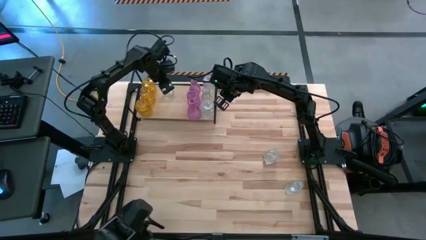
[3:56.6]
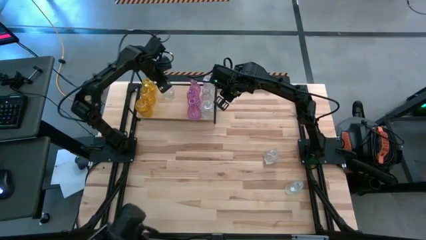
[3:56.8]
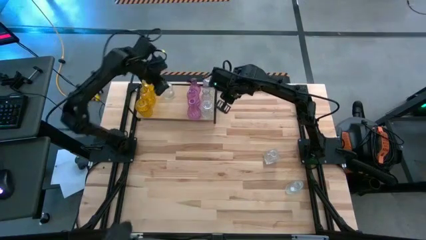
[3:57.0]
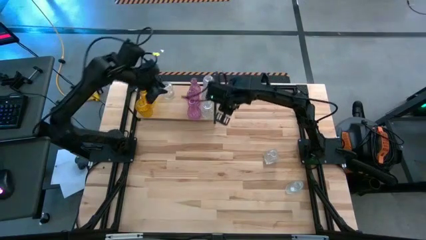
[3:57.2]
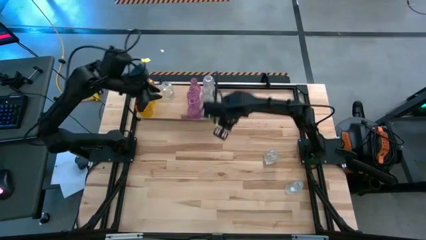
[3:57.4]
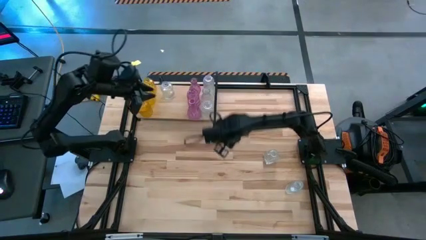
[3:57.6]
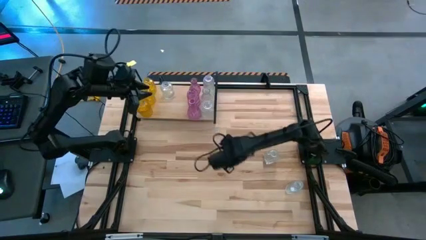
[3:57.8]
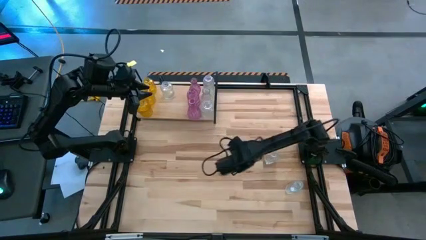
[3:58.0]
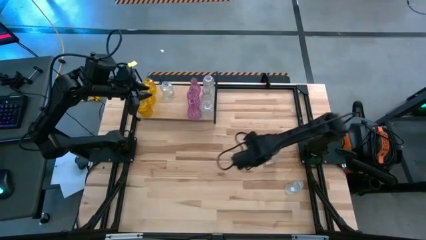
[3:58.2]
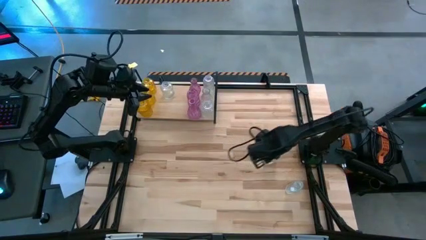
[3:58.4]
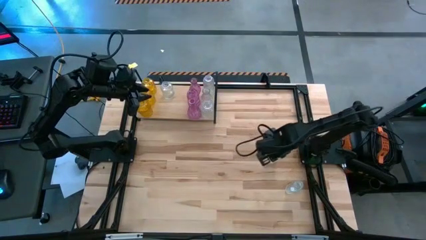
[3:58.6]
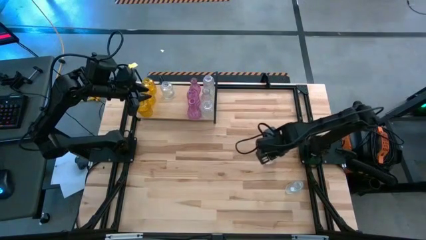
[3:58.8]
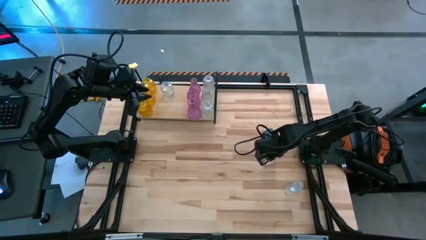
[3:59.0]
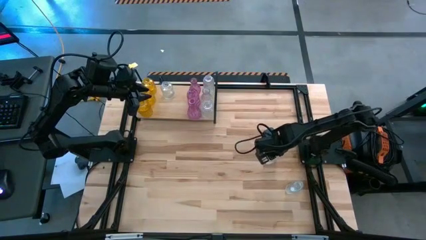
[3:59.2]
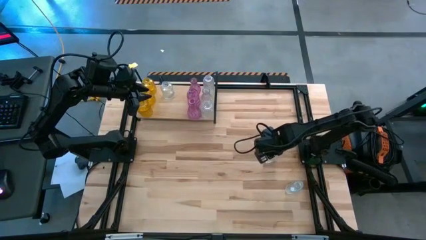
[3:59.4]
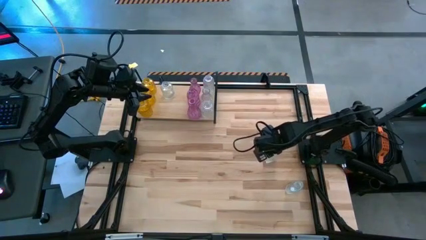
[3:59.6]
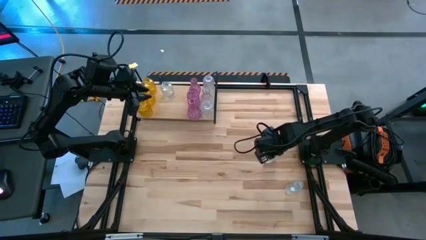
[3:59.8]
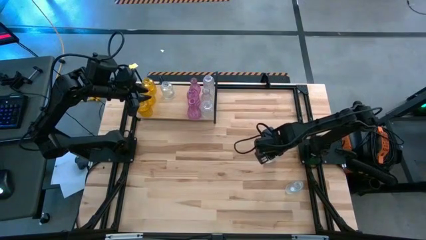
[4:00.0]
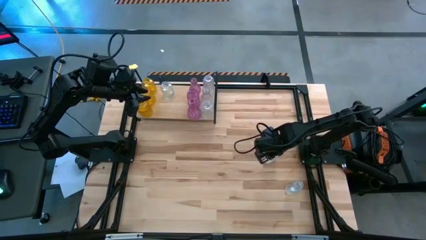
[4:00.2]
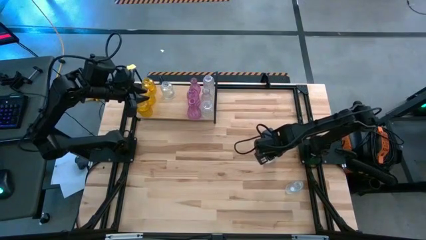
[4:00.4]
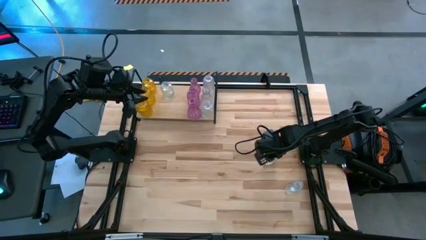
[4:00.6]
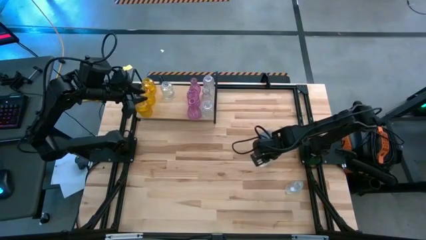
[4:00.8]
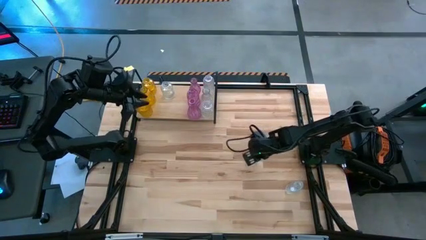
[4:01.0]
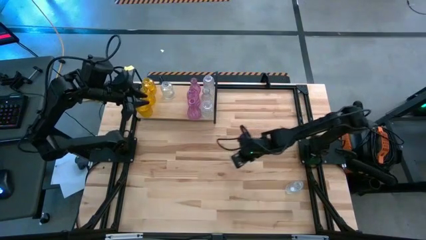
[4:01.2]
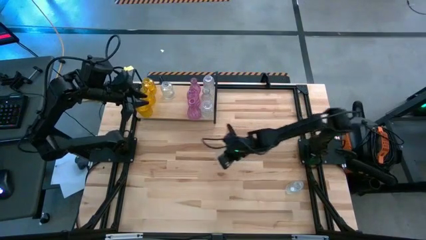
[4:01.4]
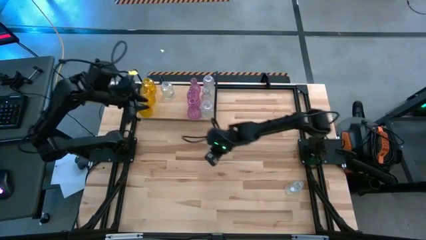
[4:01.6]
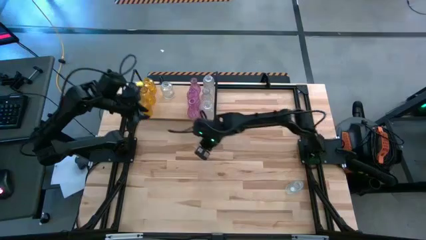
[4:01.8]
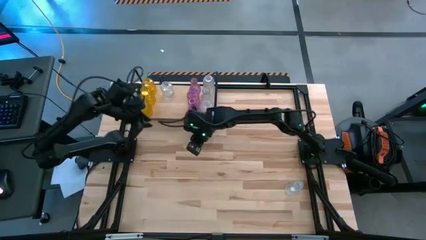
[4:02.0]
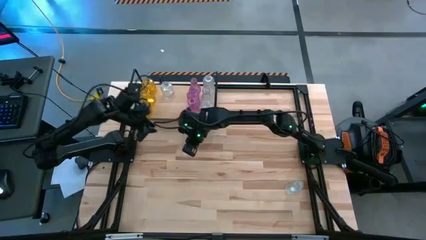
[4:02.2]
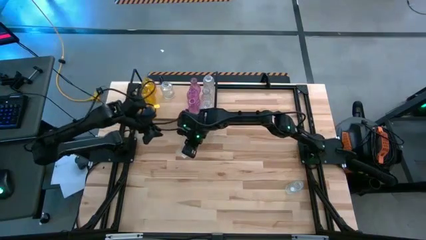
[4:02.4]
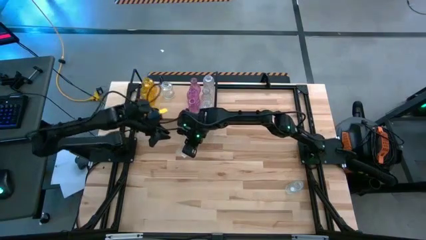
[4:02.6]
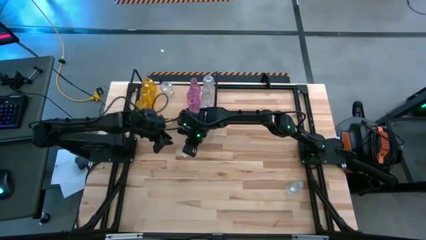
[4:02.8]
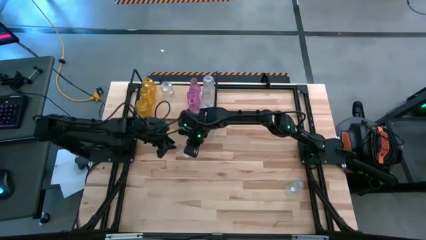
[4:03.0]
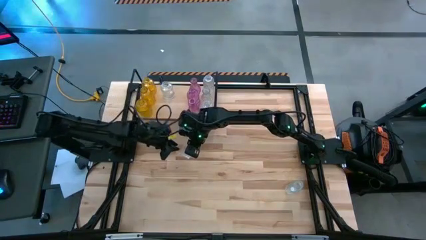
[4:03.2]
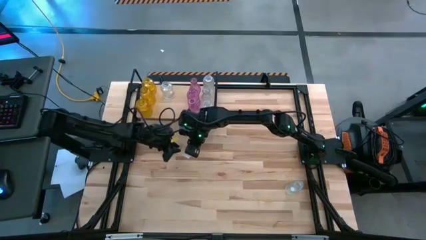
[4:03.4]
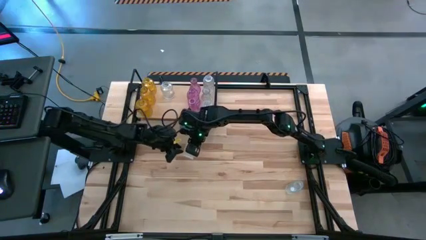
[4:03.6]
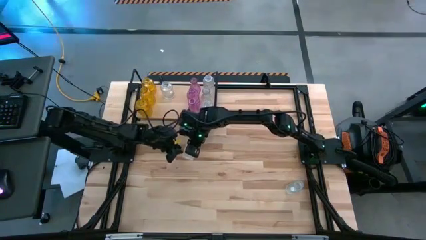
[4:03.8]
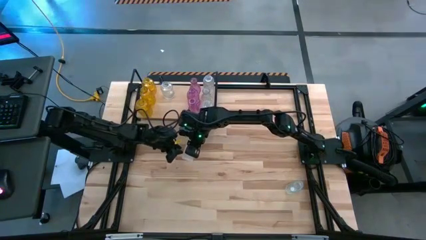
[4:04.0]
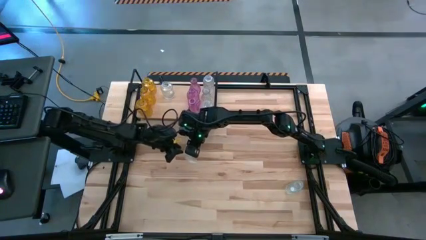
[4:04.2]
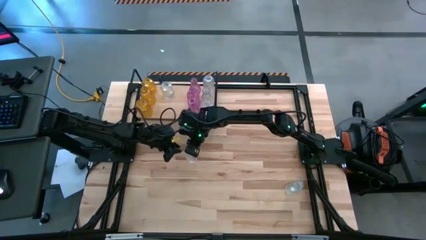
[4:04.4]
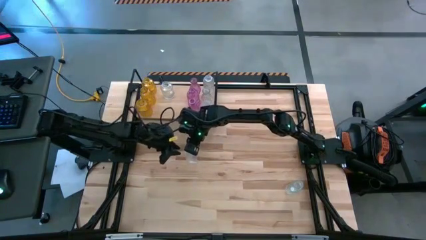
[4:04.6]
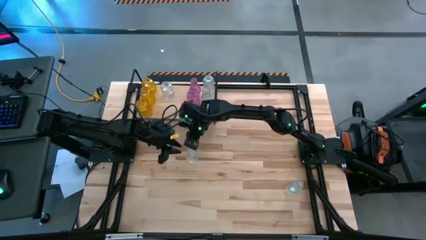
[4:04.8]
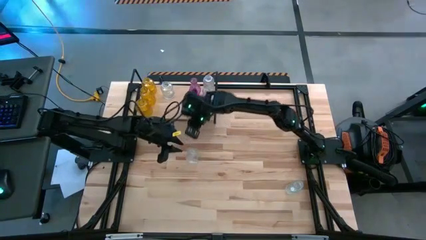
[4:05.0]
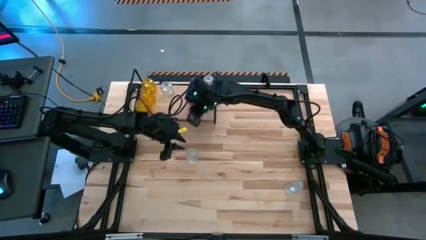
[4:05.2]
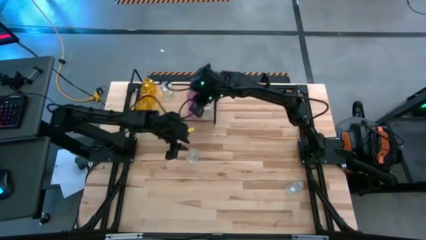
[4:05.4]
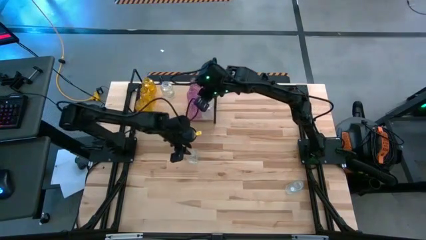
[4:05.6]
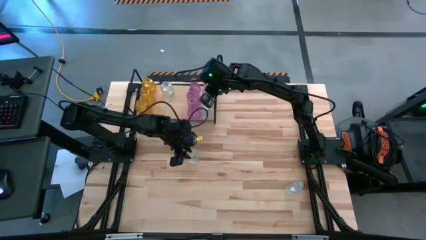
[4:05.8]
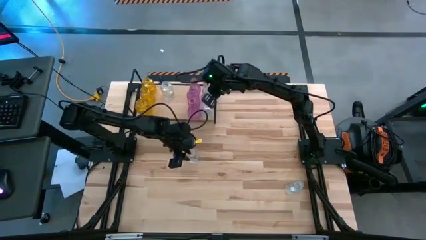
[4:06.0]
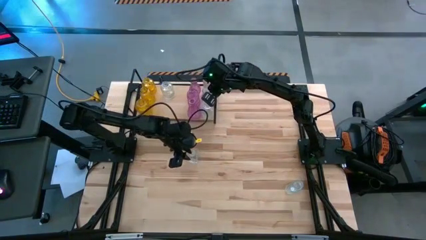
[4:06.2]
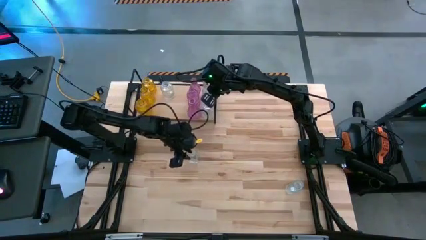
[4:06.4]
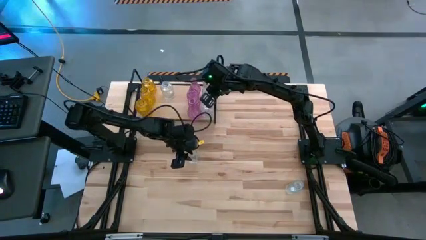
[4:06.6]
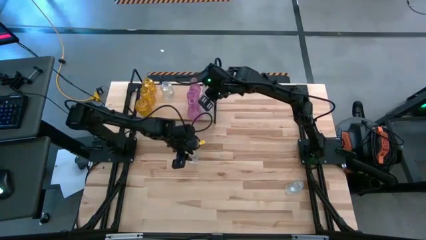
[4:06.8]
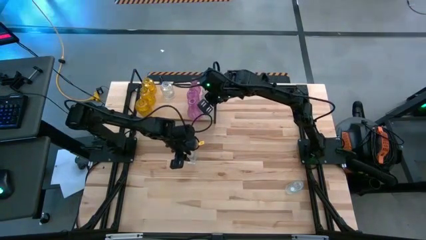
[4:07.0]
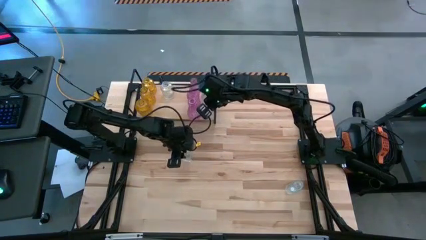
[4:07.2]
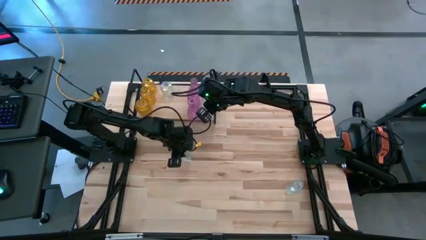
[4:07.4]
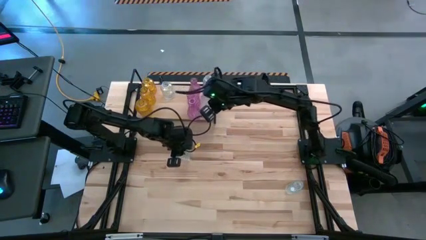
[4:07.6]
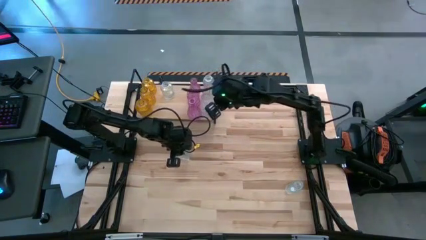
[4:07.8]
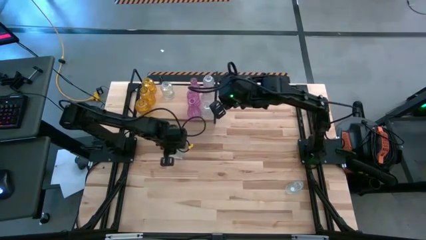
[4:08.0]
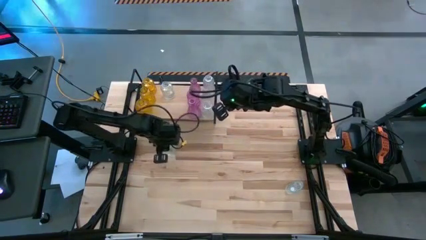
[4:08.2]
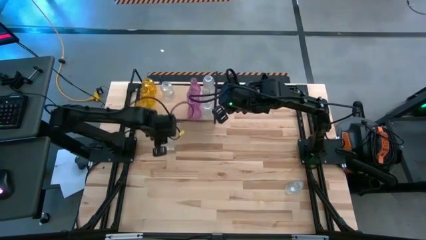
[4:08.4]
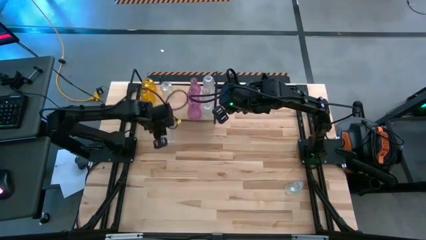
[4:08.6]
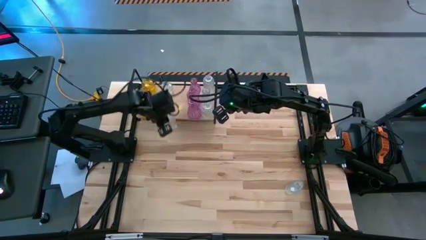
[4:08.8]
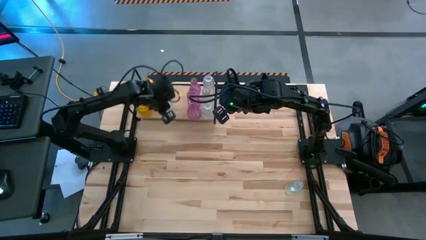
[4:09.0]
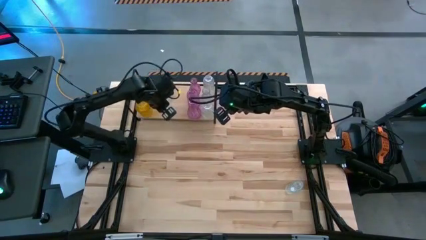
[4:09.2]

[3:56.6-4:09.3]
Task: sort vases onto shelf
Put the transparent vase on the shelf aligned with the left transparent vase

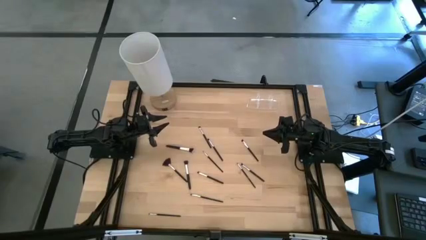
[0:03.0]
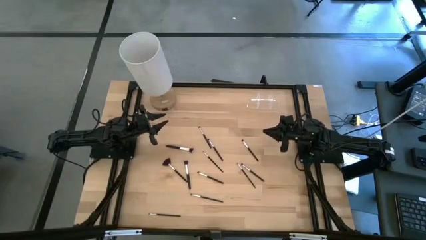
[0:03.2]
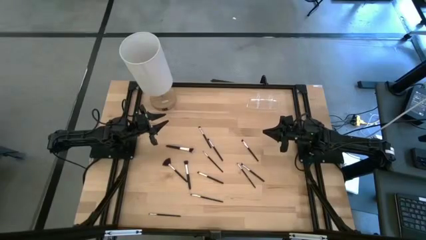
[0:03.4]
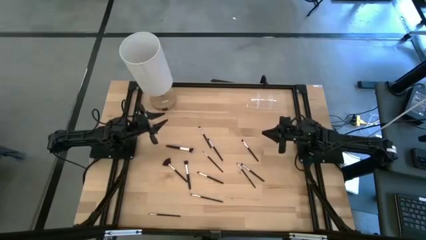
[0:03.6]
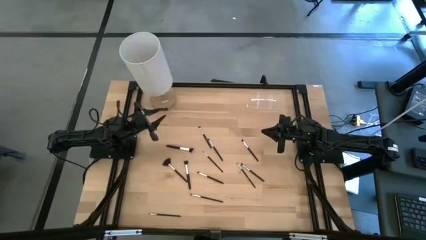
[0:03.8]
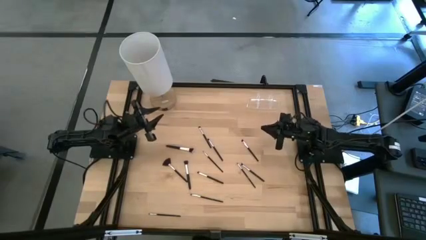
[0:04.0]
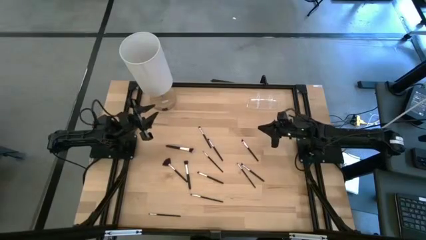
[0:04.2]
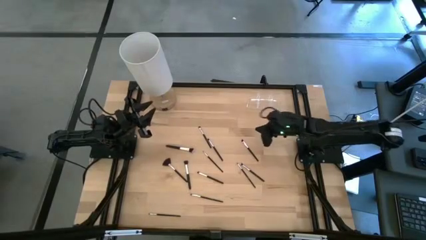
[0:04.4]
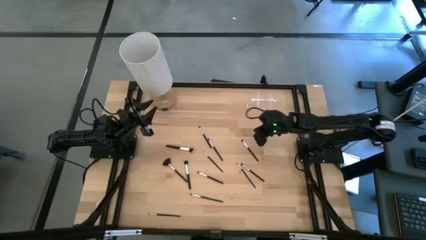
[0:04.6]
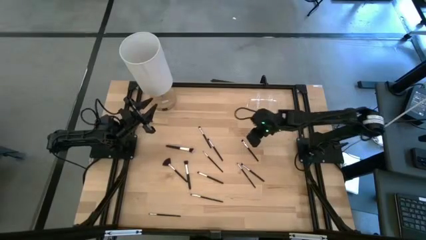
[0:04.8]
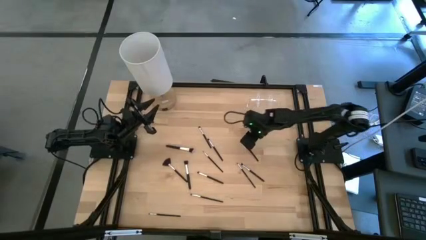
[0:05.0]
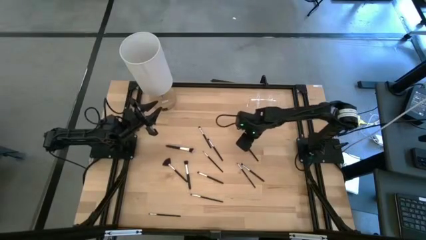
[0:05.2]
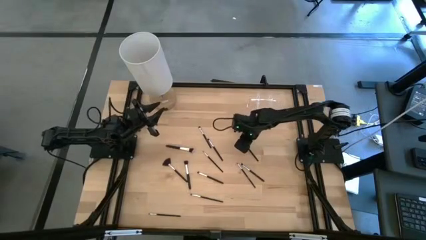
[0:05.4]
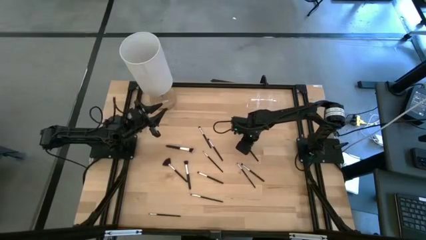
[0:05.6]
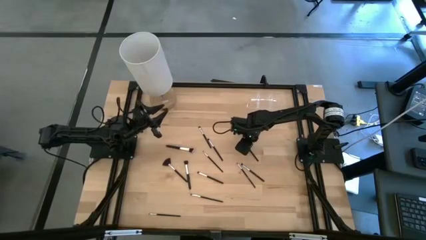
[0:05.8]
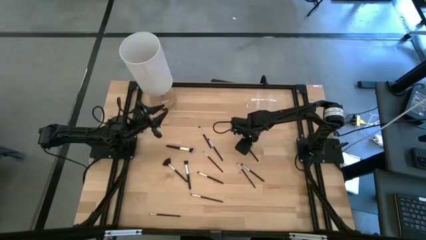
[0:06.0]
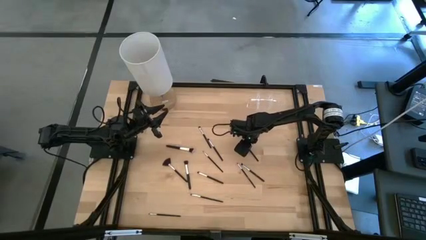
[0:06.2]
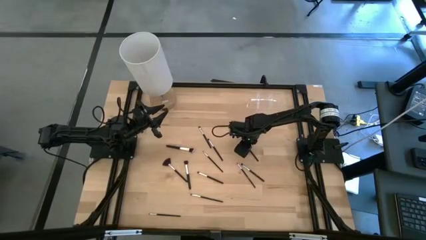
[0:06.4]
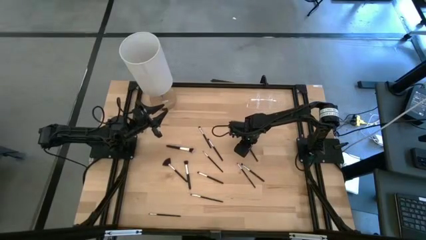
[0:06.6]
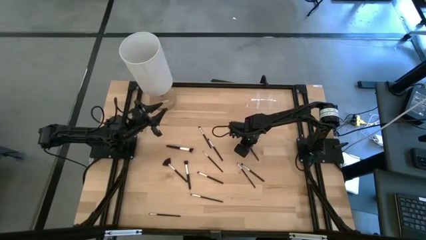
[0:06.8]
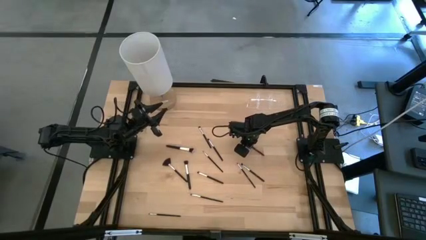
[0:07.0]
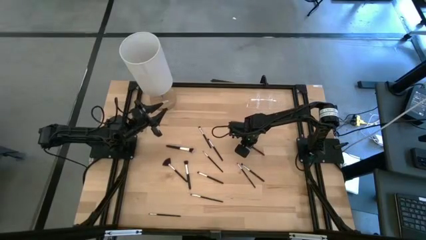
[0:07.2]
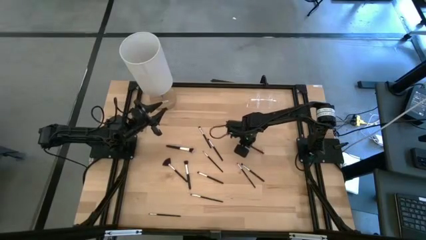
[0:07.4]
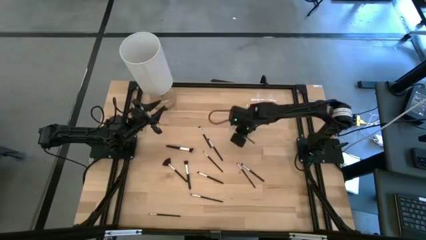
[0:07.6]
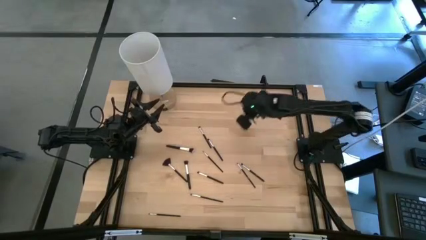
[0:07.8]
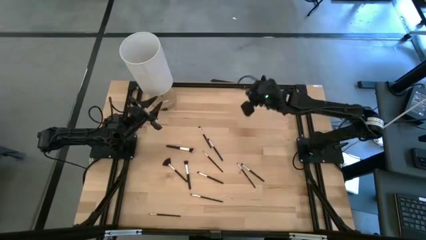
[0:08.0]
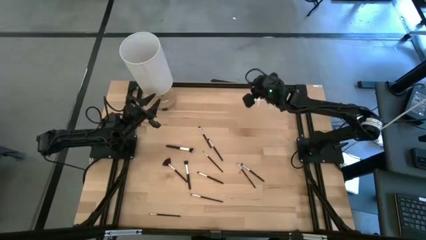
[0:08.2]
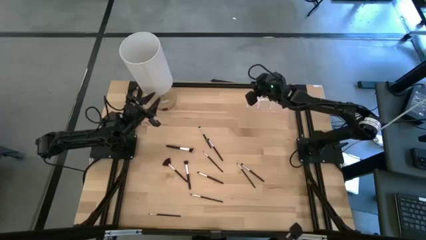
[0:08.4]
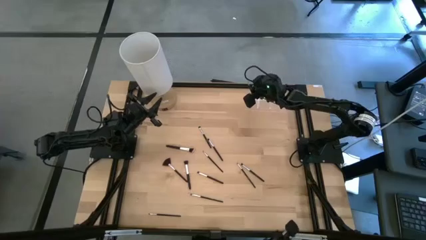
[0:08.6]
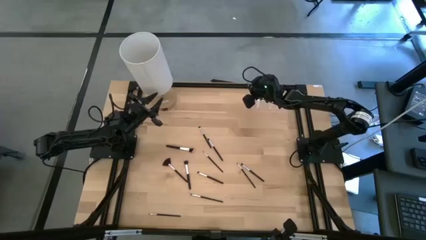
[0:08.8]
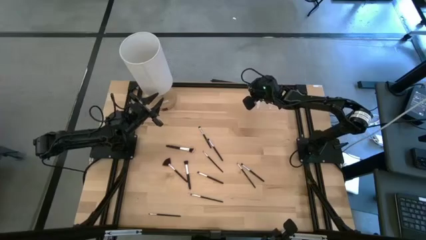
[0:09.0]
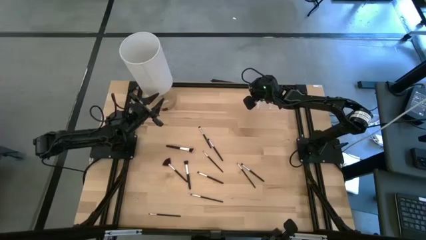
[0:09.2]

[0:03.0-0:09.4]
Task: Put items in baskets/containers
Put the eyeshadow brush into the left side of the transparent organizer
